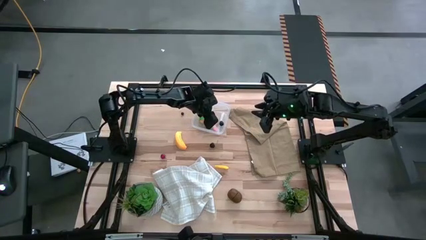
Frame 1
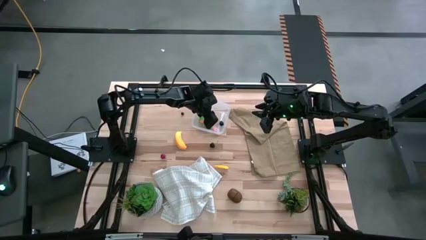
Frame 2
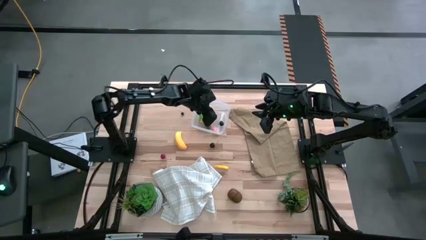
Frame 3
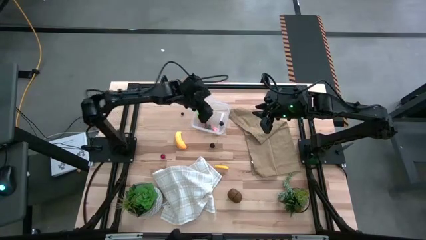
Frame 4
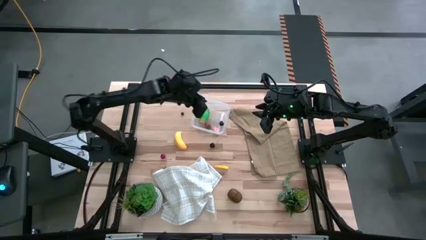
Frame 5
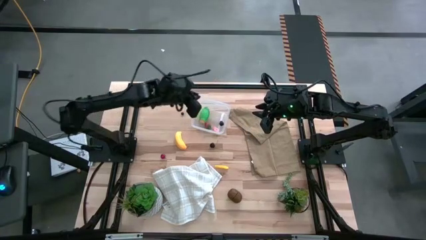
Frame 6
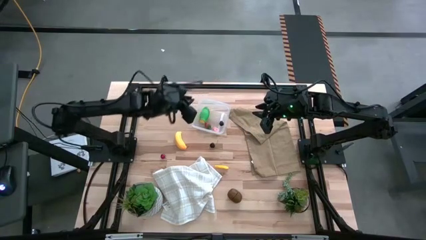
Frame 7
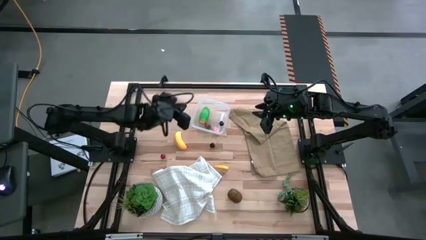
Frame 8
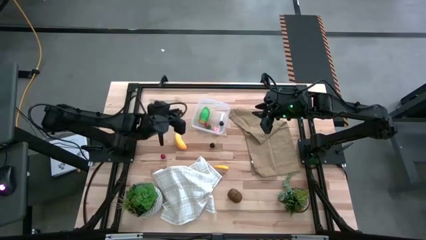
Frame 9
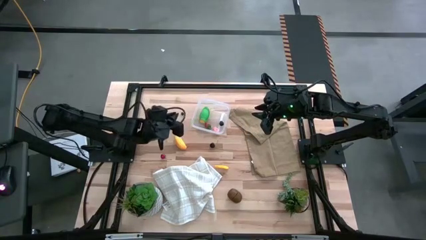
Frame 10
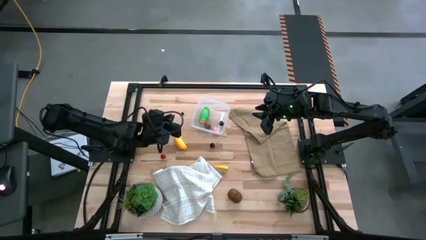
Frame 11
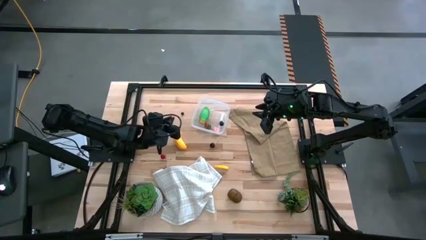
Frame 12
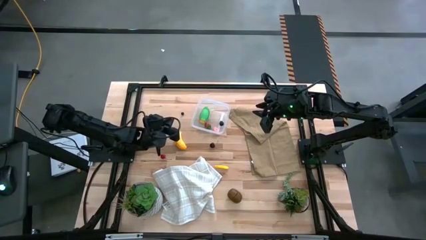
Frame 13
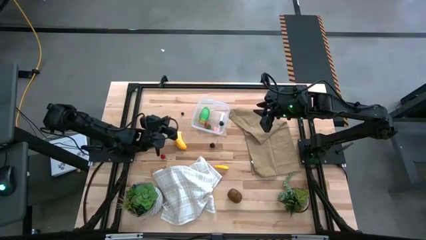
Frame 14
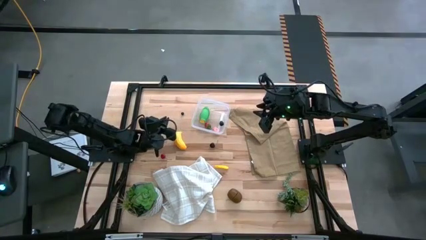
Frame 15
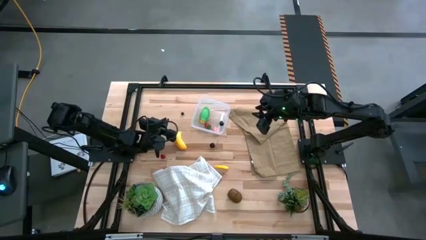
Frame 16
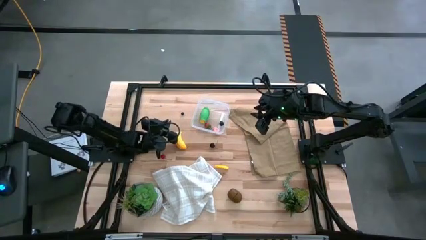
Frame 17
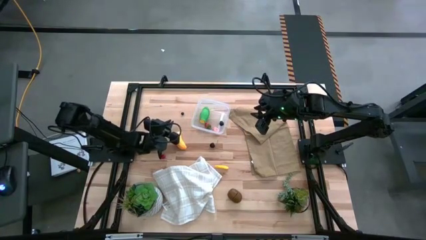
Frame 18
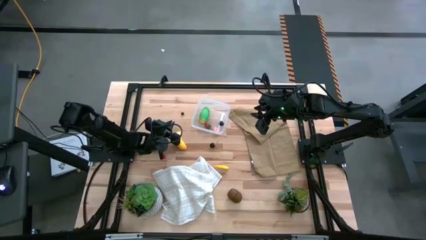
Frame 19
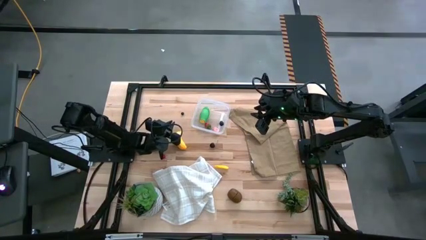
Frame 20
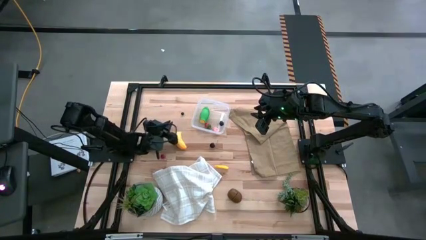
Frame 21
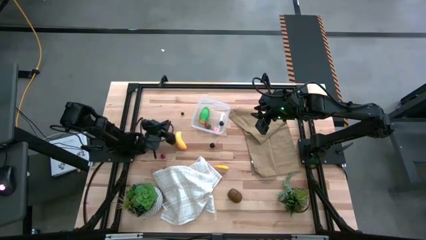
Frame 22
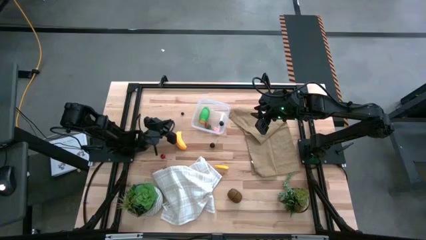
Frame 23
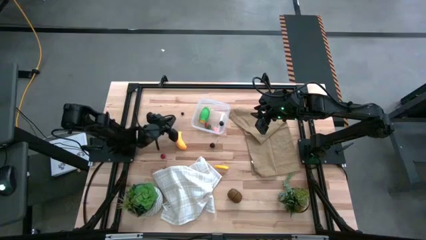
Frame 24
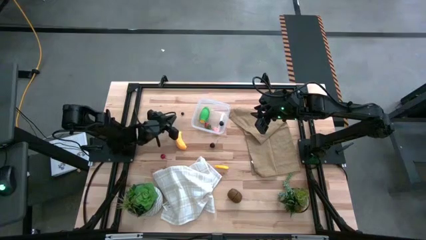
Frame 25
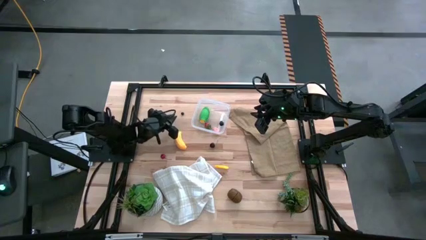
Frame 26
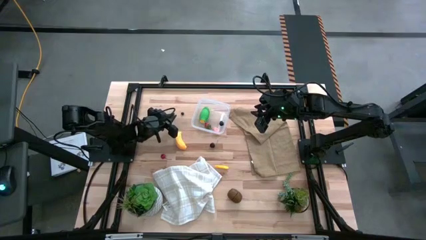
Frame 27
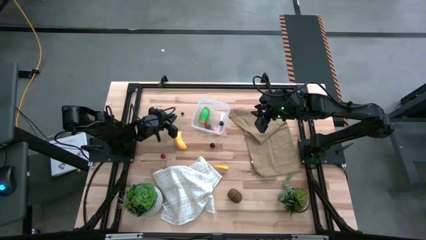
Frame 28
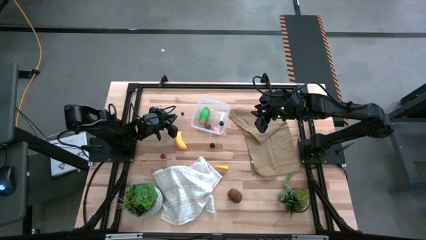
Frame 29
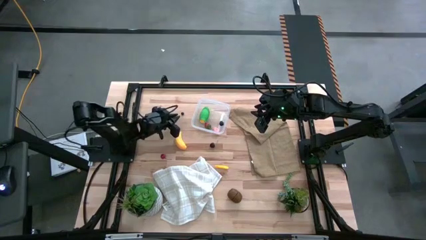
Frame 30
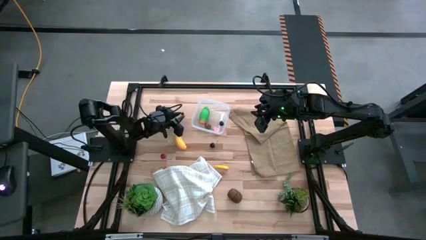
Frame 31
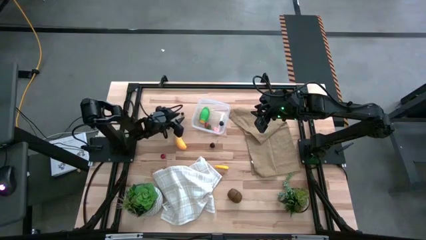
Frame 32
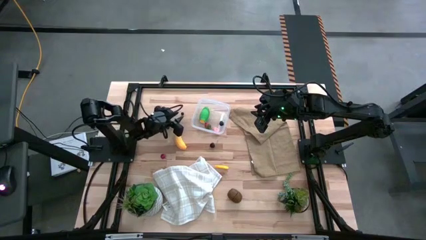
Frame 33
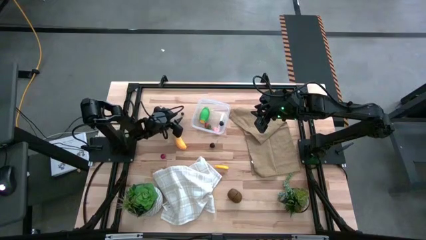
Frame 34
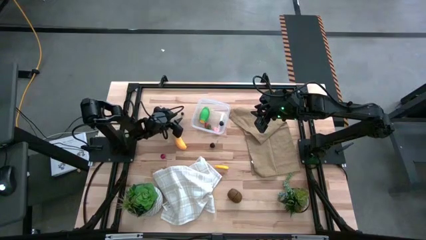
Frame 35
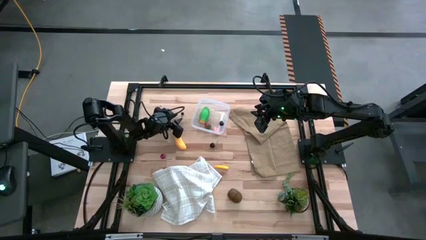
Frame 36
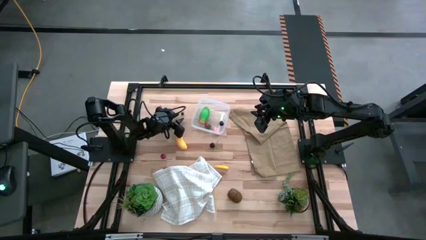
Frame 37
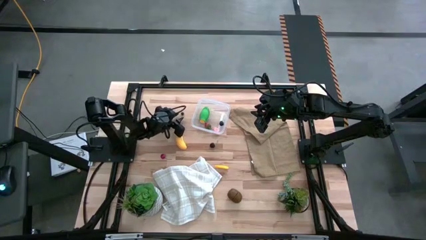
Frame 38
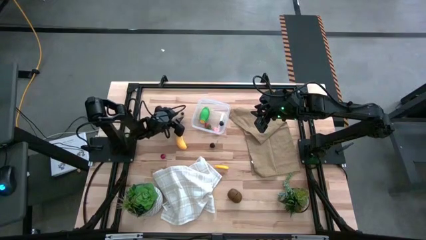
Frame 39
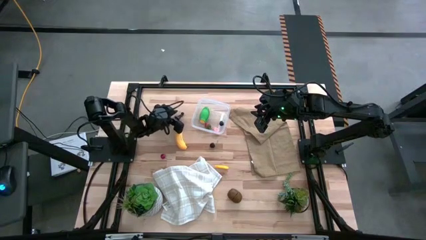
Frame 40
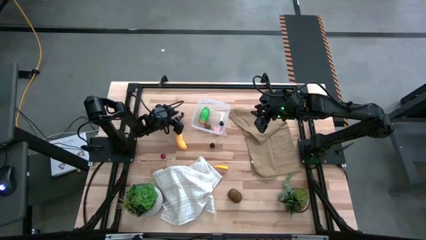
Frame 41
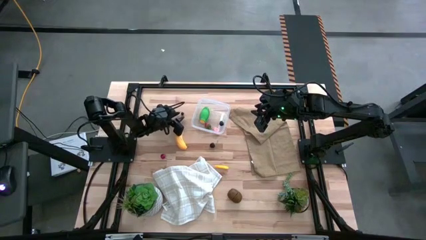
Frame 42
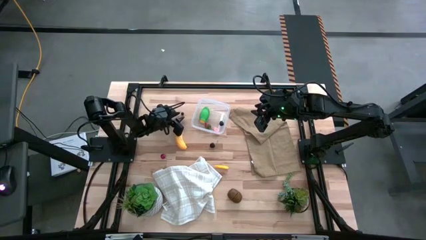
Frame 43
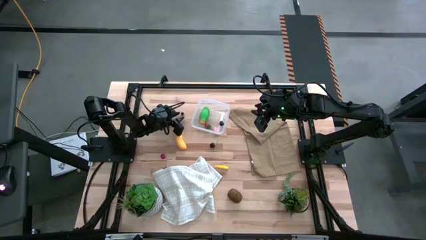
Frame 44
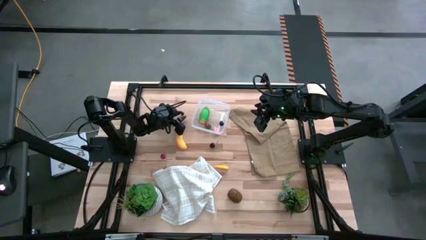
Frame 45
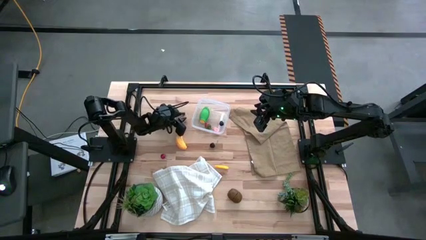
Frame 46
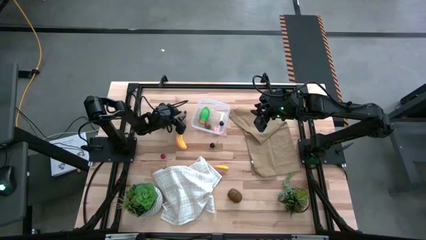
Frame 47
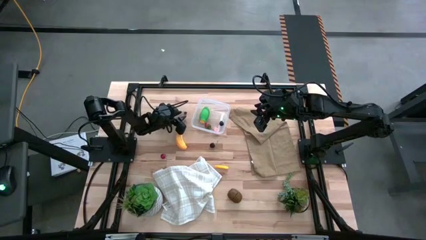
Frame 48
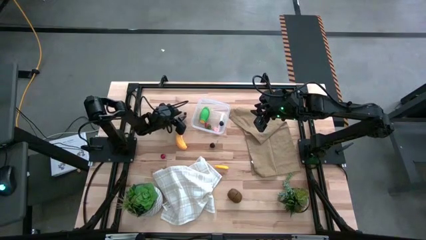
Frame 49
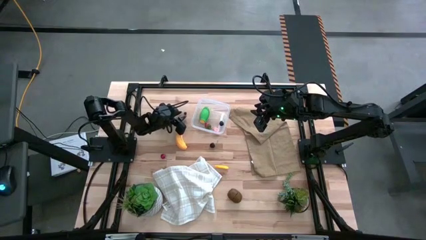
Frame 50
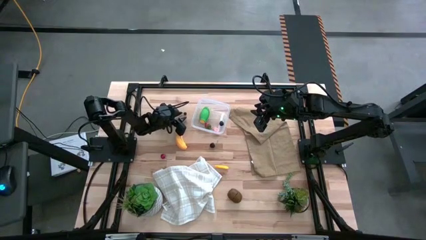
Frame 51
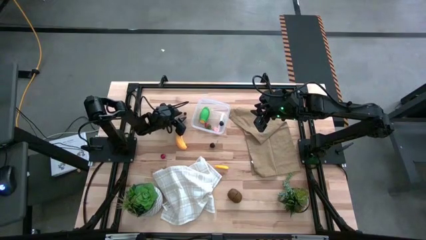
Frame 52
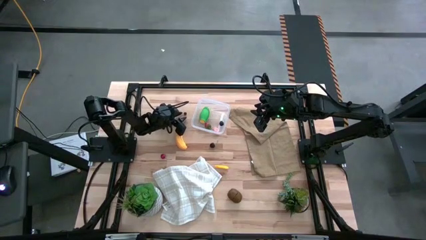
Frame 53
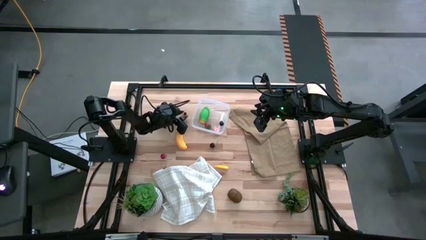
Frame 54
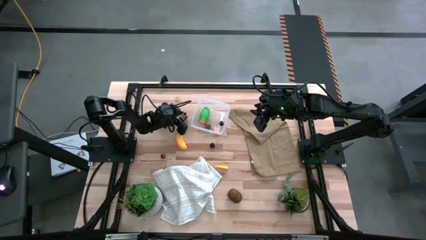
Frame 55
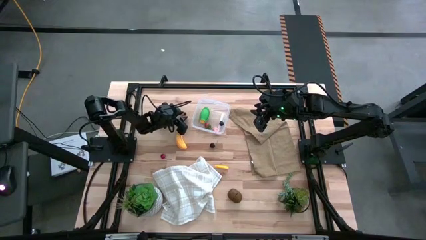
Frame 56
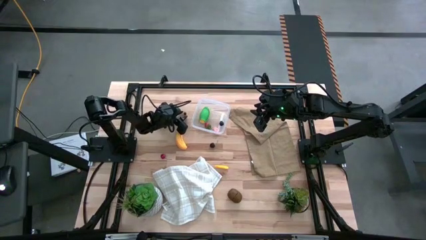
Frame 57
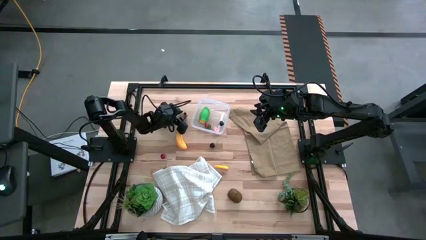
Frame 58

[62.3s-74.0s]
Task: Pick and placing Produce into tupperware
Put the blueberry into the transparent bin
